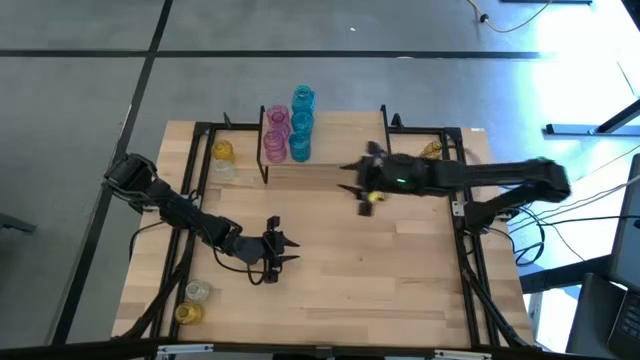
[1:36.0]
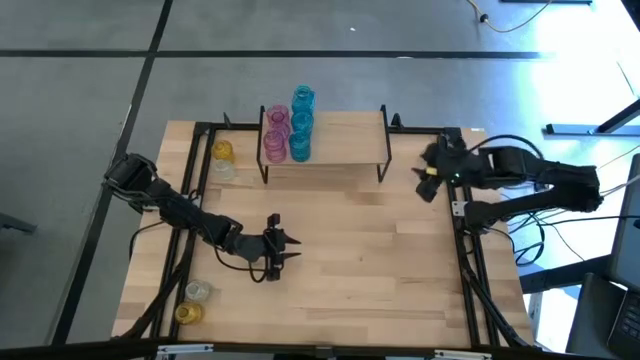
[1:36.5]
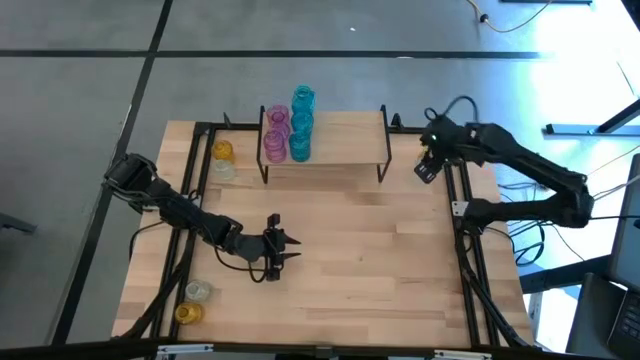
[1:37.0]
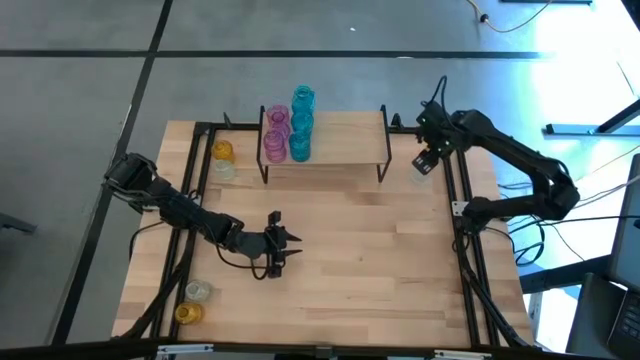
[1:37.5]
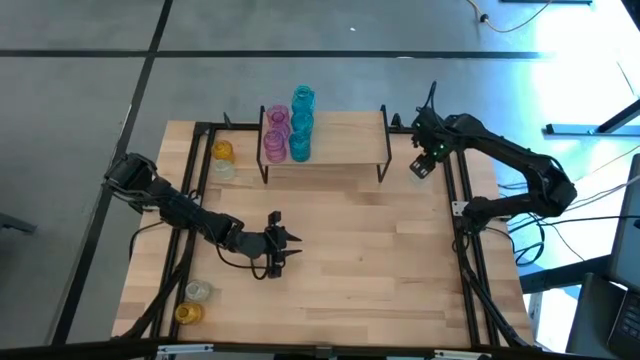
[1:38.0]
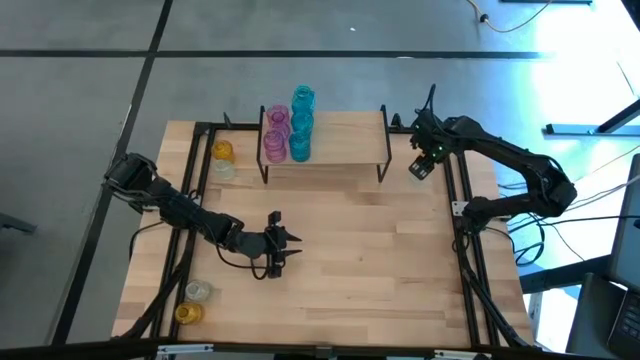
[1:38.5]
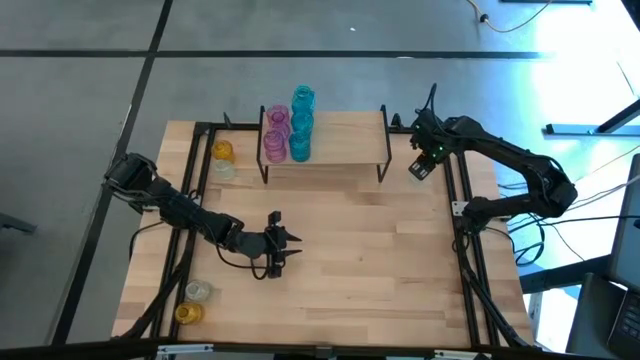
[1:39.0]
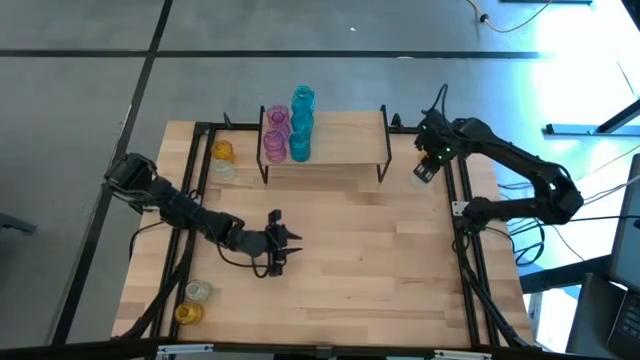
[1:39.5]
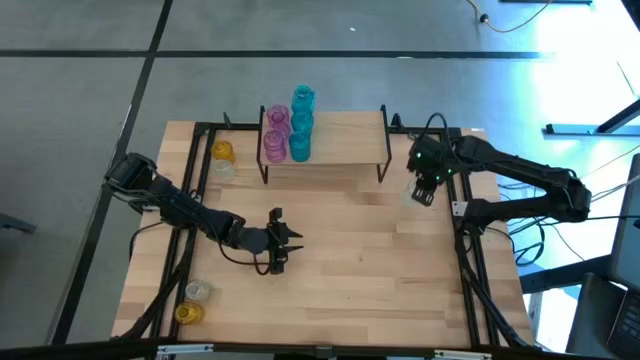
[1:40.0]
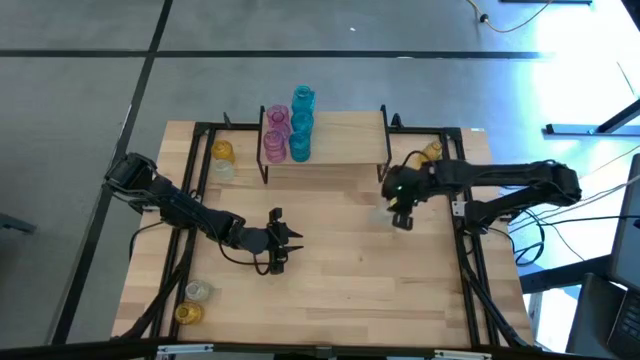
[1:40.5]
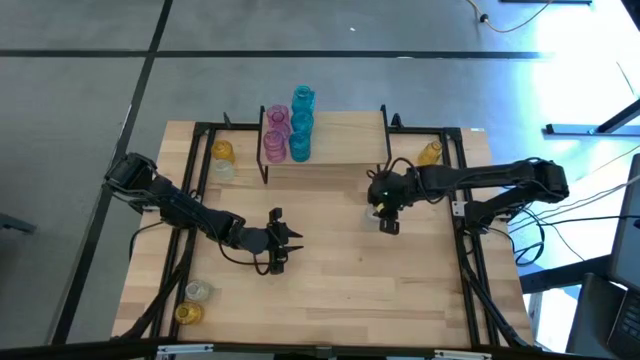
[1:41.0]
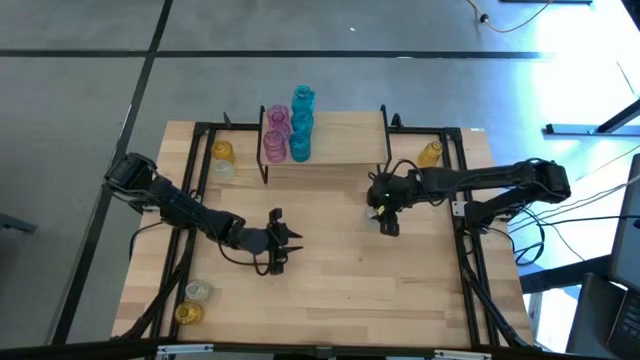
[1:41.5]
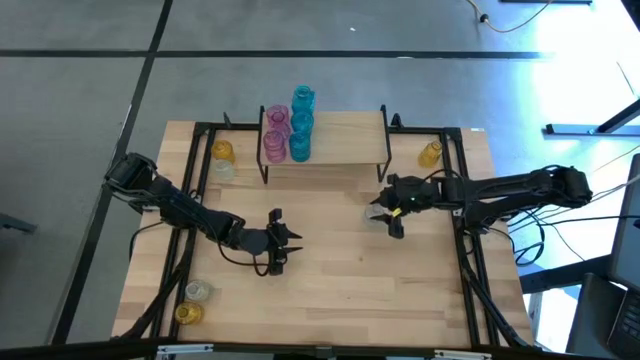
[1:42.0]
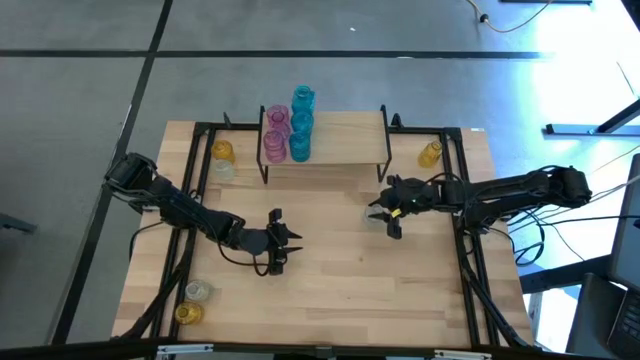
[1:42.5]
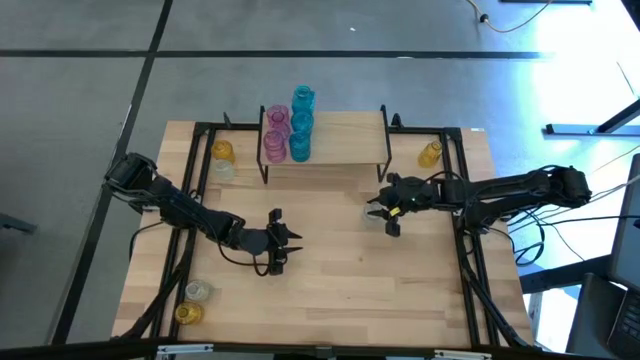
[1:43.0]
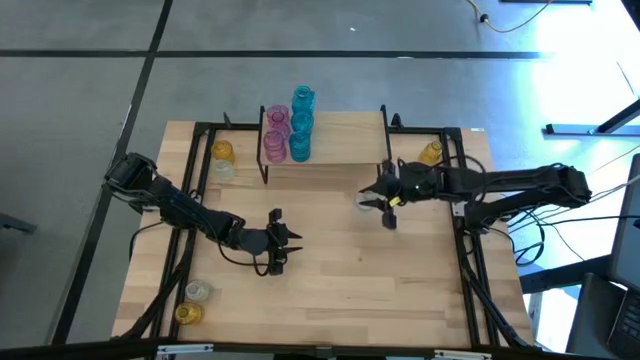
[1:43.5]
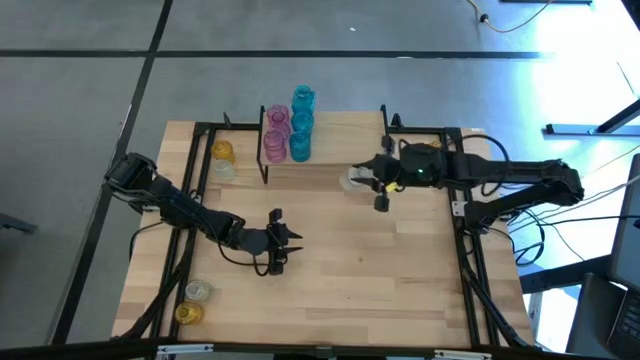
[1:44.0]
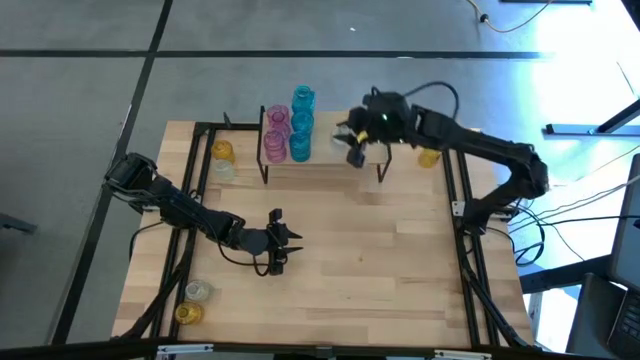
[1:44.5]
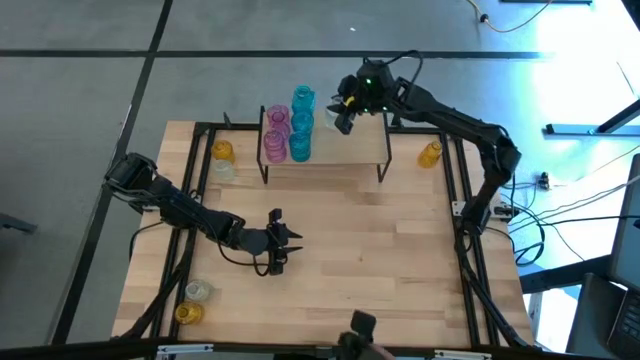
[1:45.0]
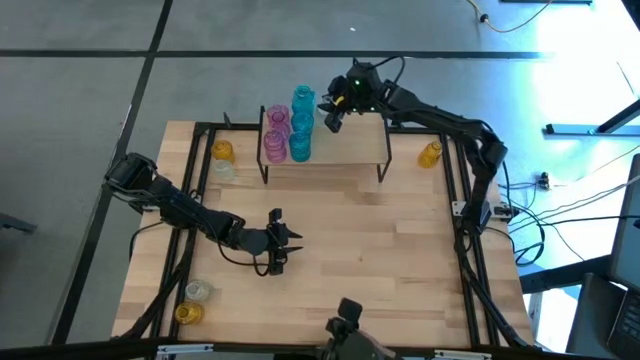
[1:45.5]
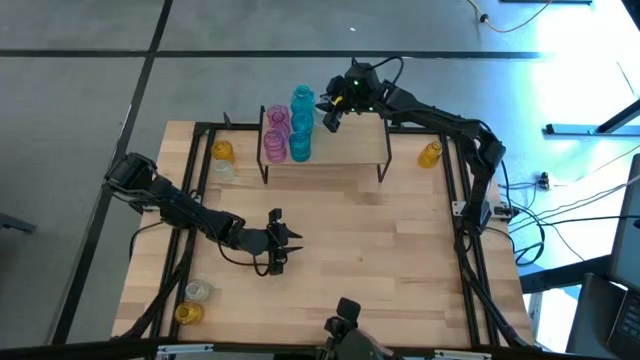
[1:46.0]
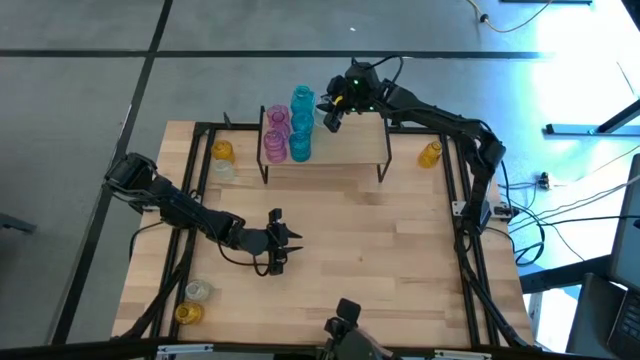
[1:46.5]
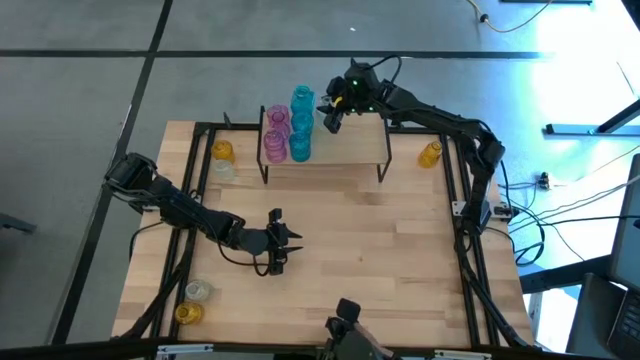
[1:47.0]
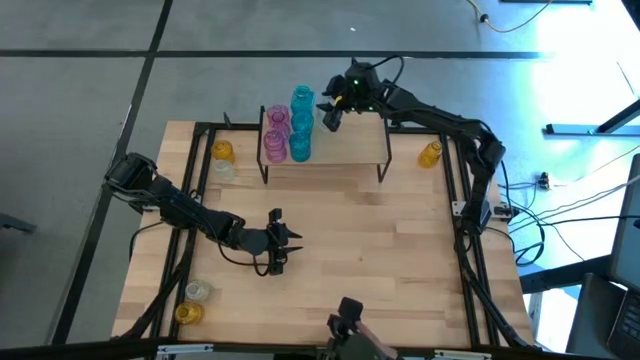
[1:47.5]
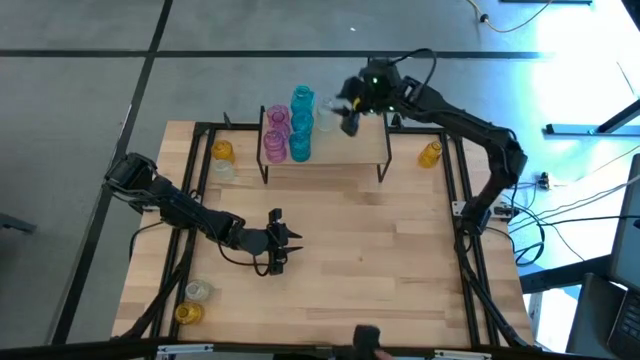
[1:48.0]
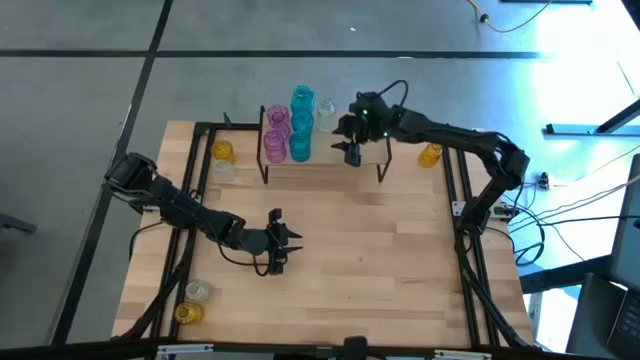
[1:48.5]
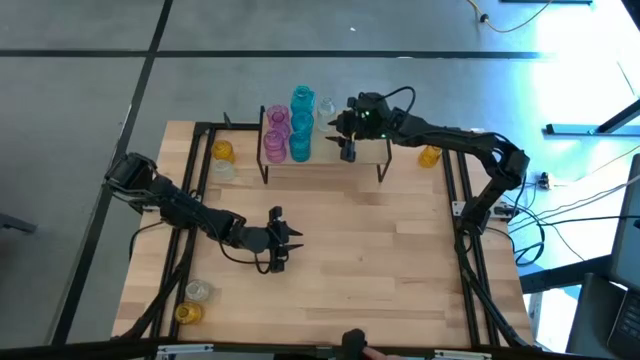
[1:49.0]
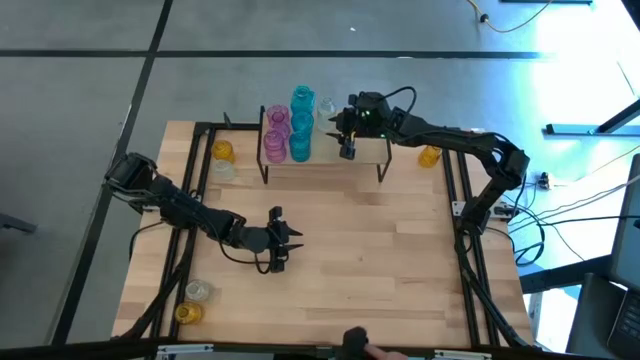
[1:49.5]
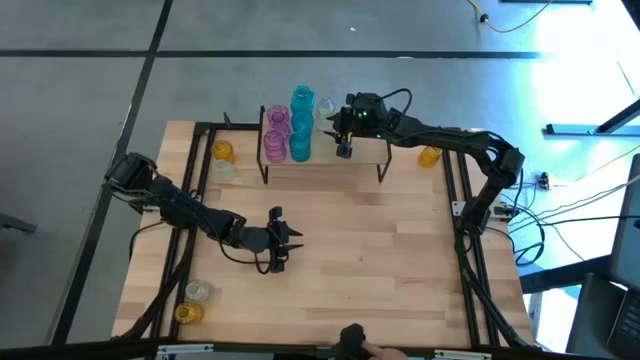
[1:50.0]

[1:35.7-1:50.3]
Task: sort vases onto shelf
Put the top right transparent flower vase on the shelf

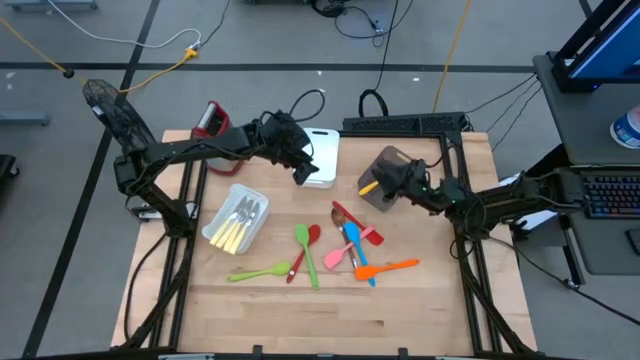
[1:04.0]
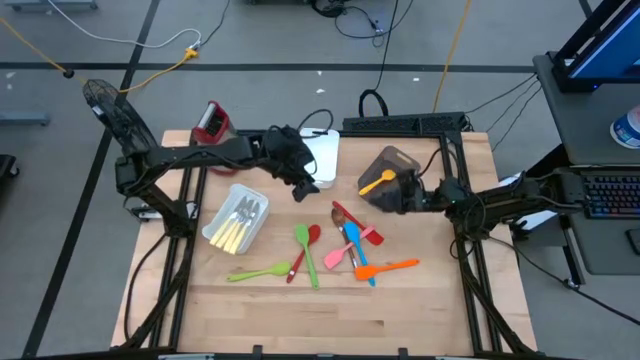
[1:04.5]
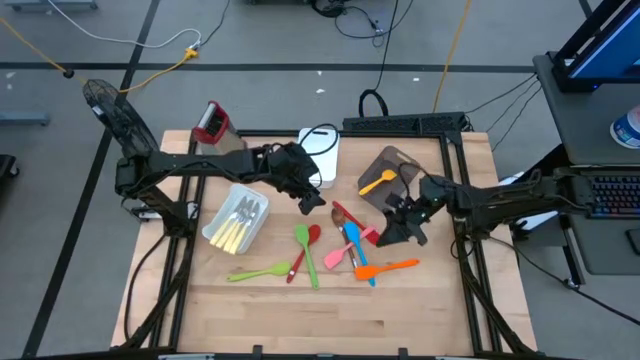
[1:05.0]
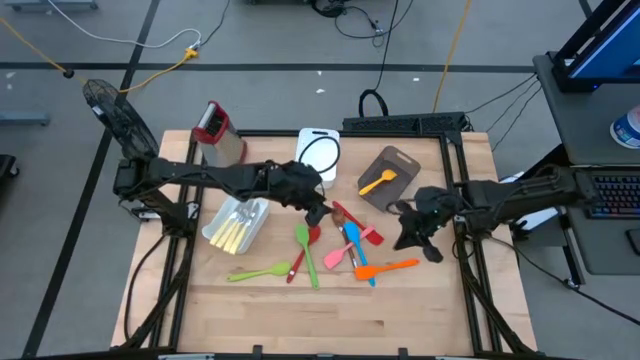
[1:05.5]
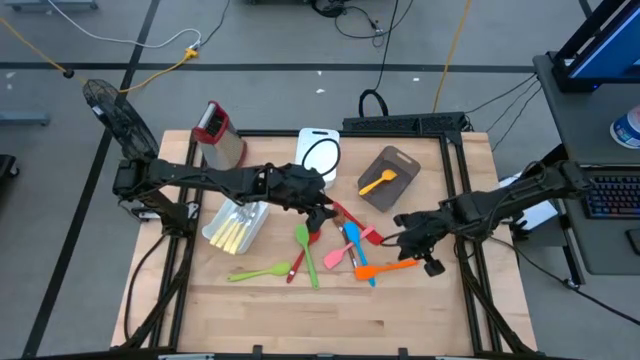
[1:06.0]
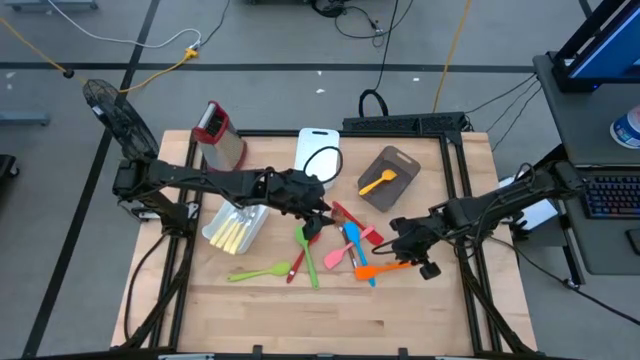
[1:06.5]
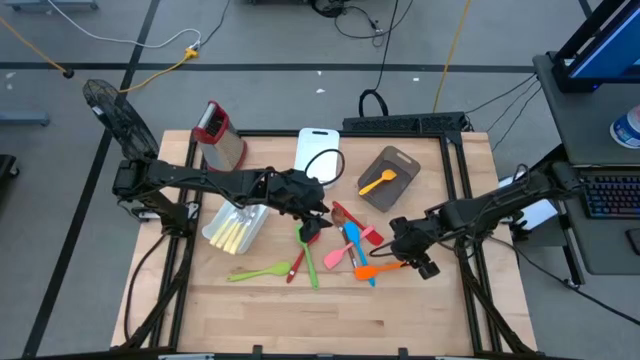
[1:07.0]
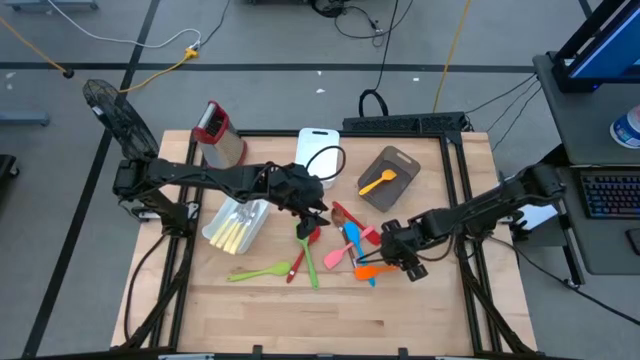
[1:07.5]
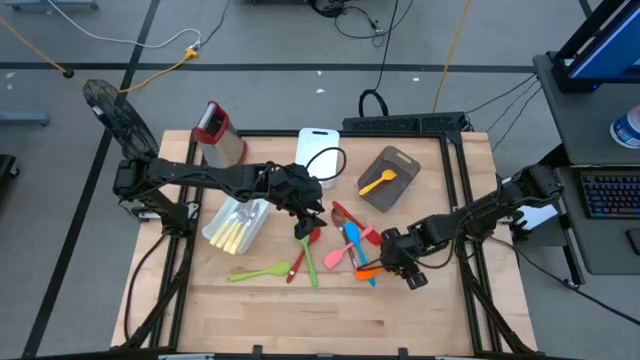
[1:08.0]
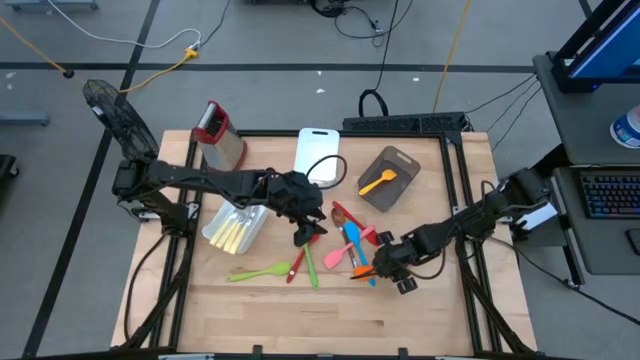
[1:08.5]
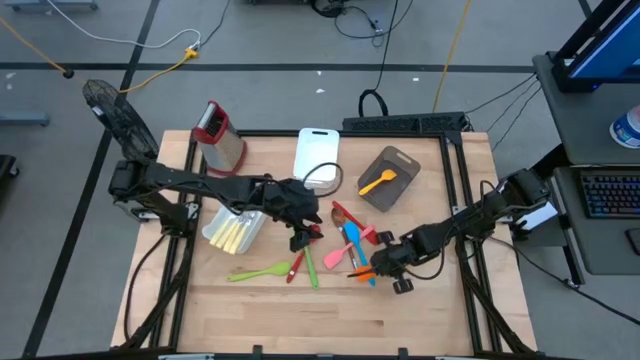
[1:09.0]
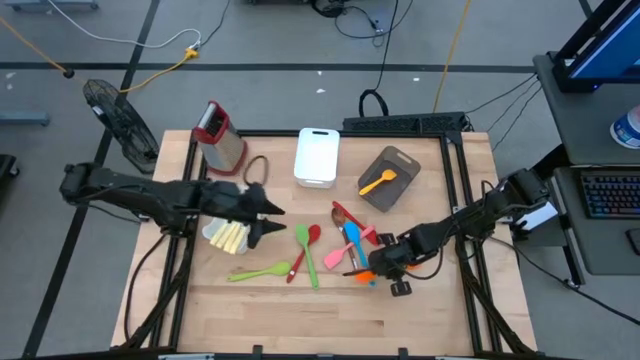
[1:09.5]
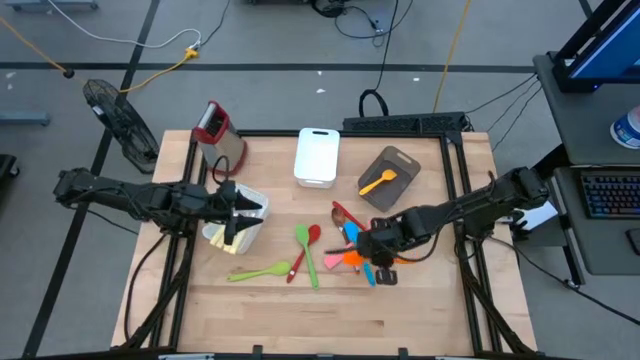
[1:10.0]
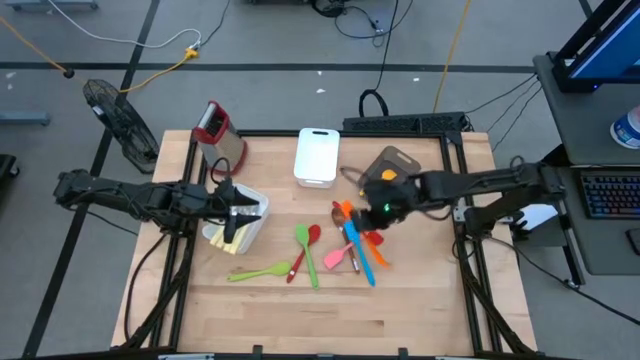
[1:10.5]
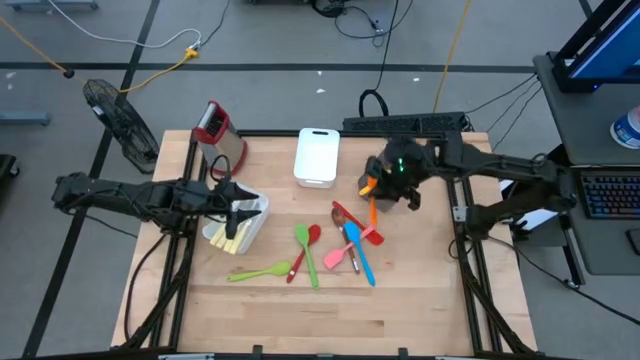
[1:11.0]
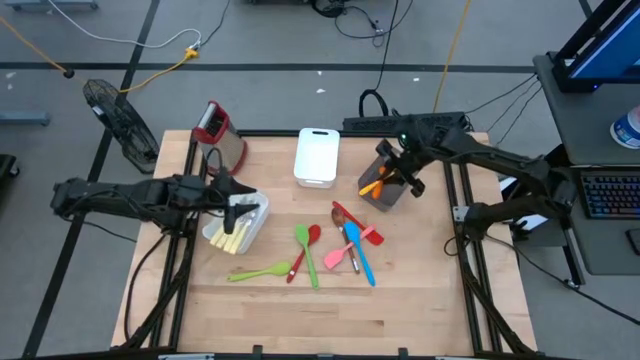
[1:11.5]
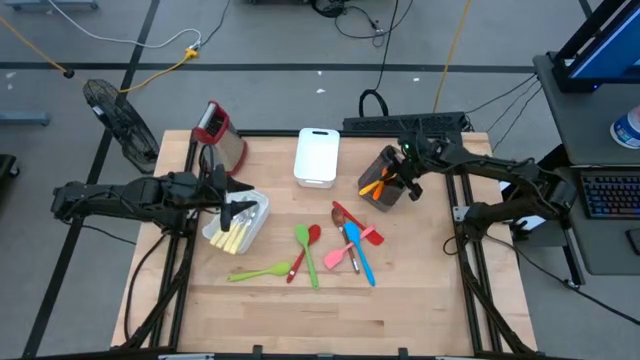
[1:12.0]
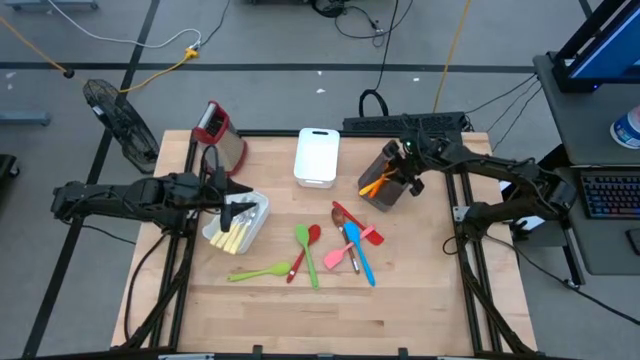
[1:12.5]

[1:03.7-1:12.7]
Task: Pick & Place Kitchen Items
Put the orange spatula into the black bin
